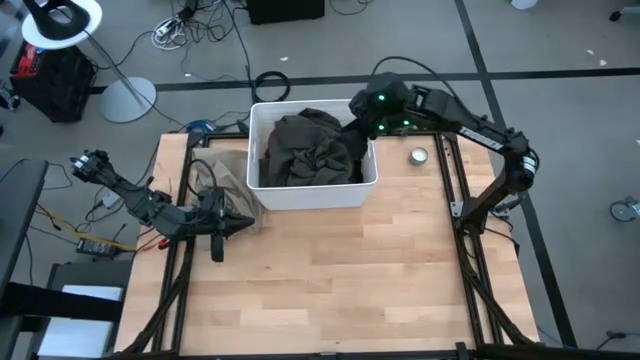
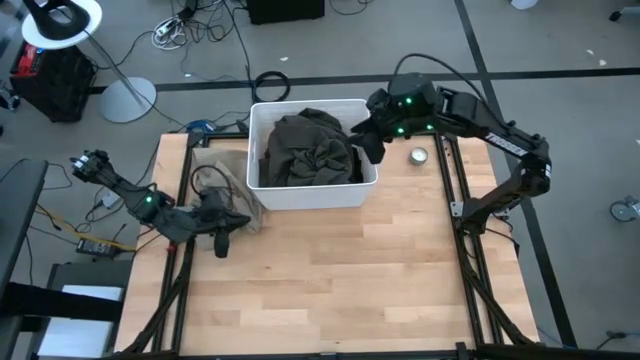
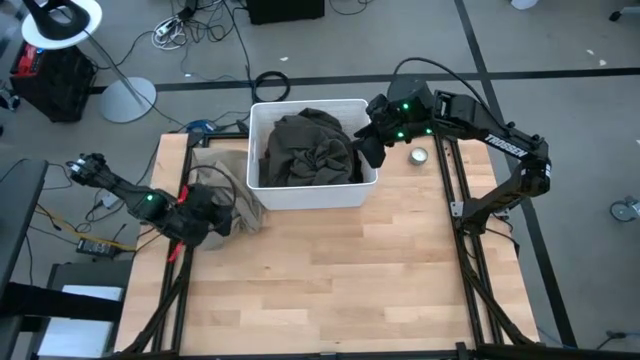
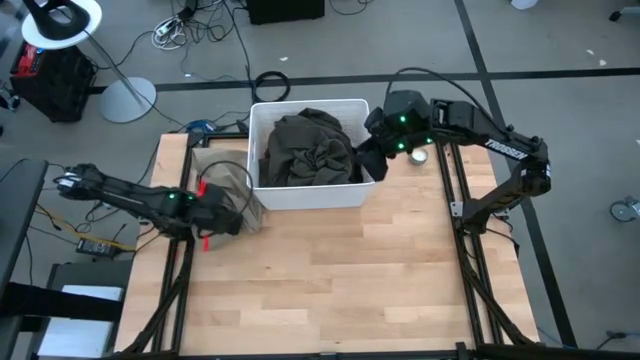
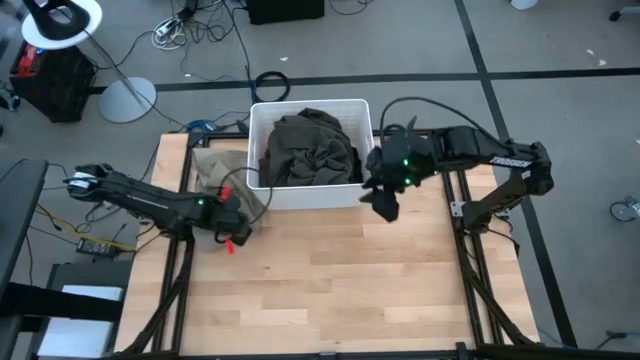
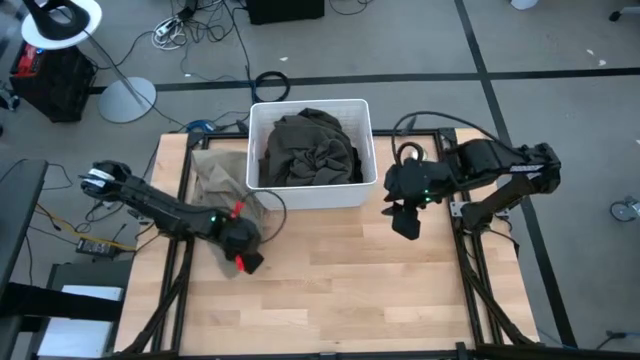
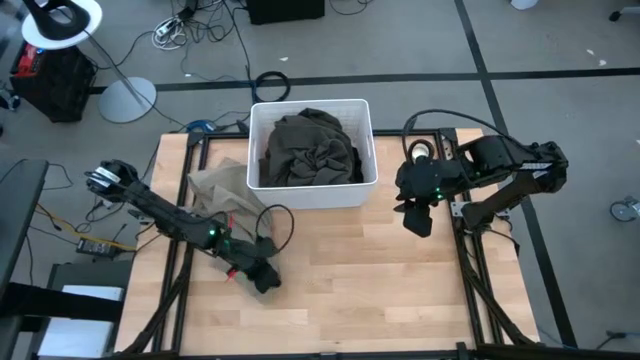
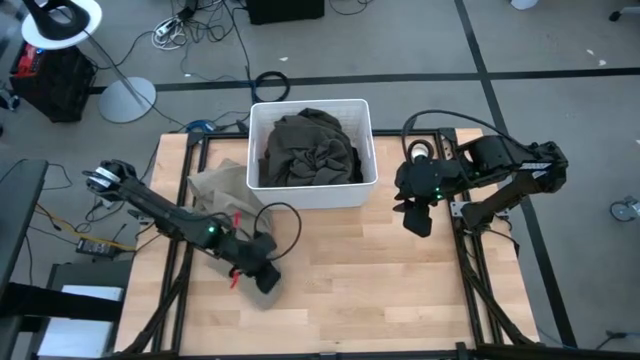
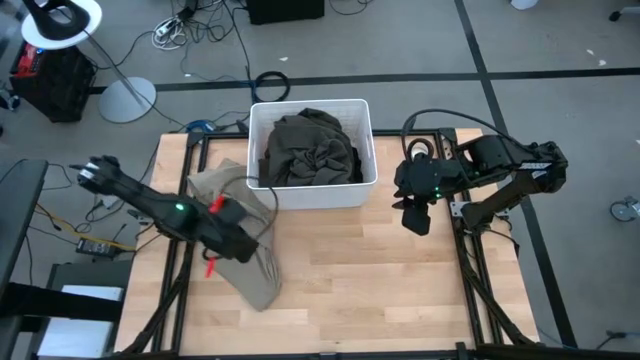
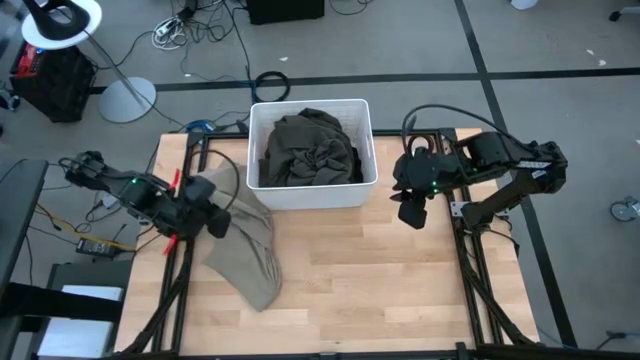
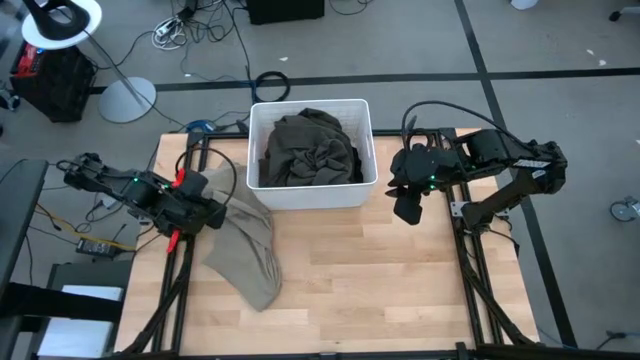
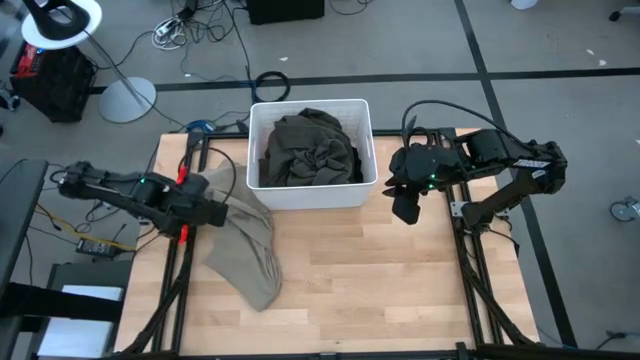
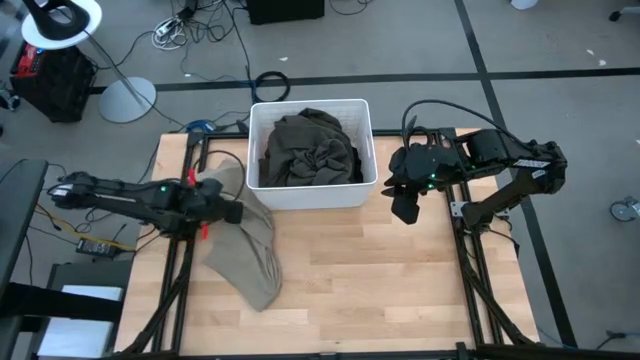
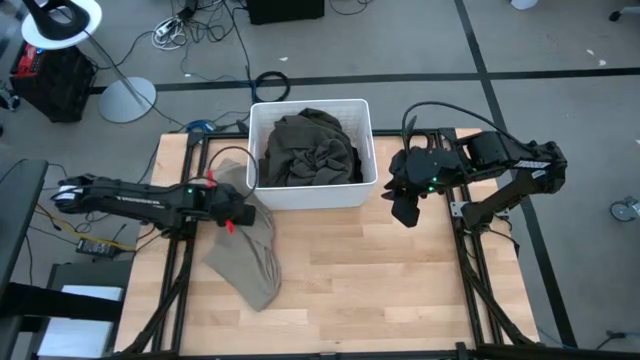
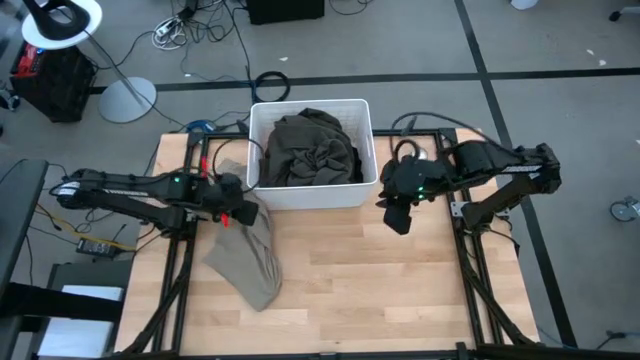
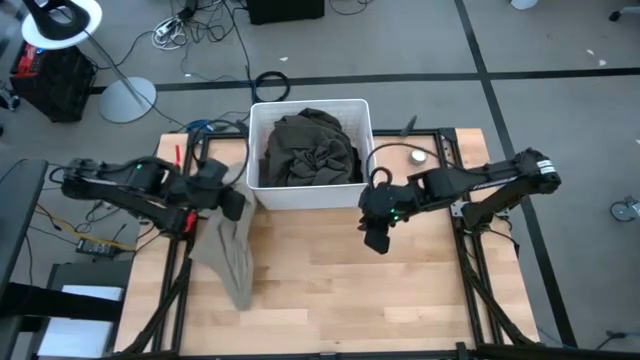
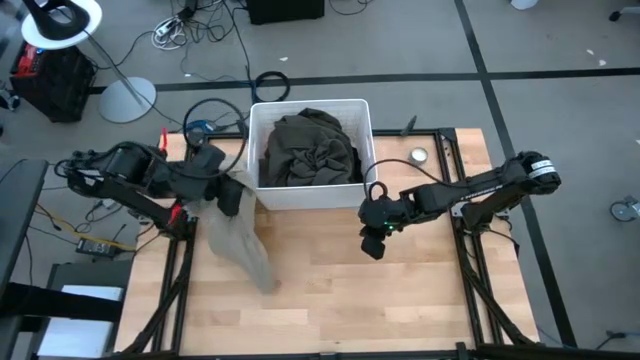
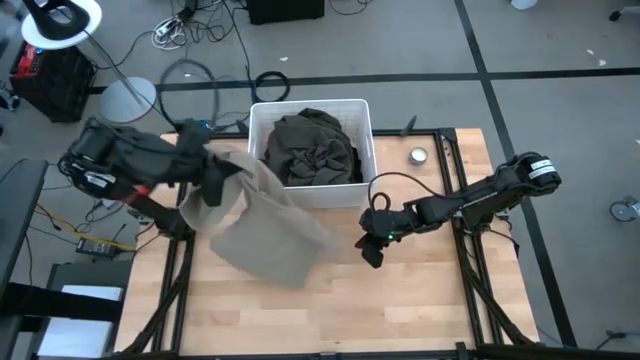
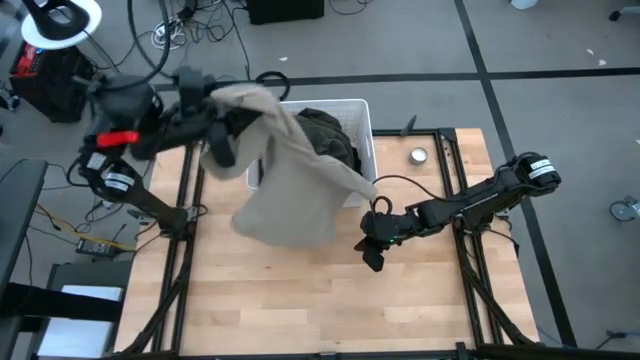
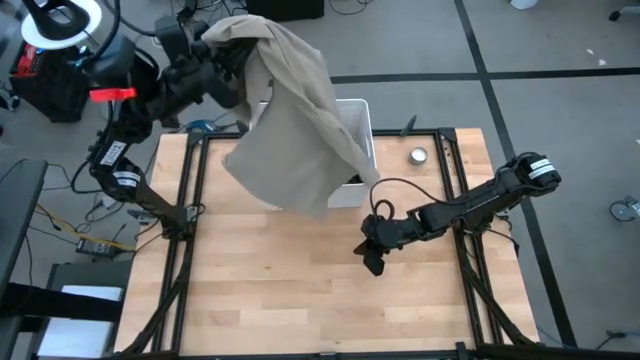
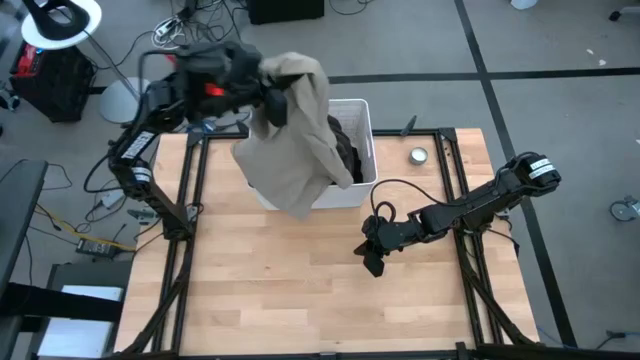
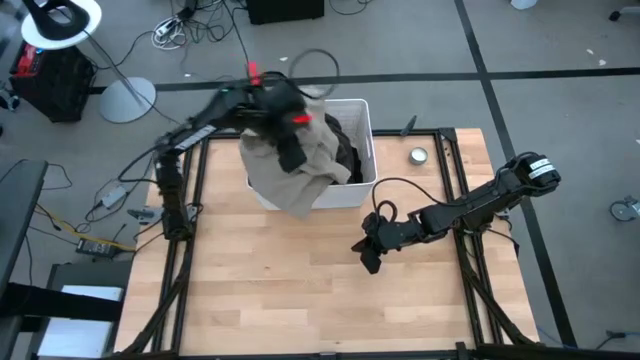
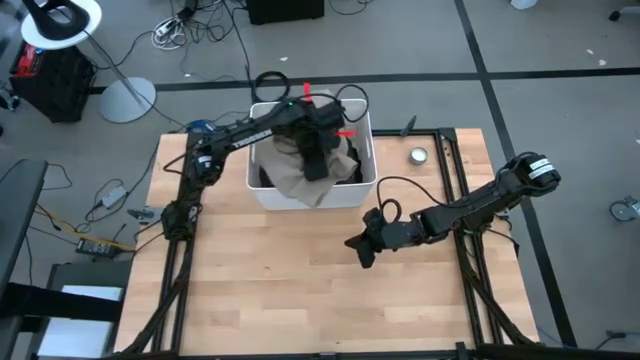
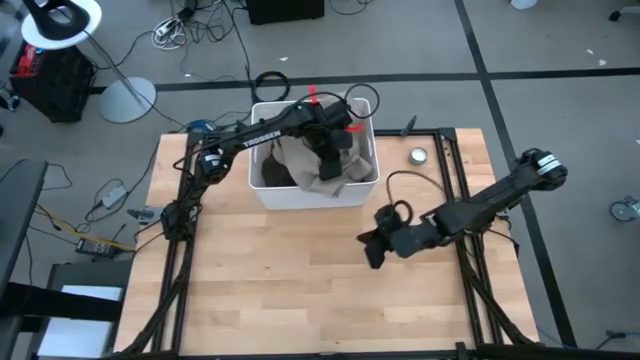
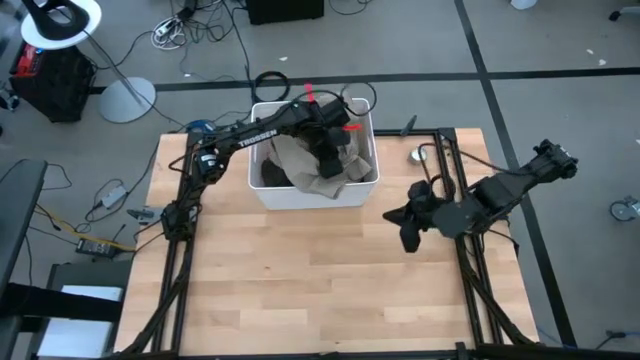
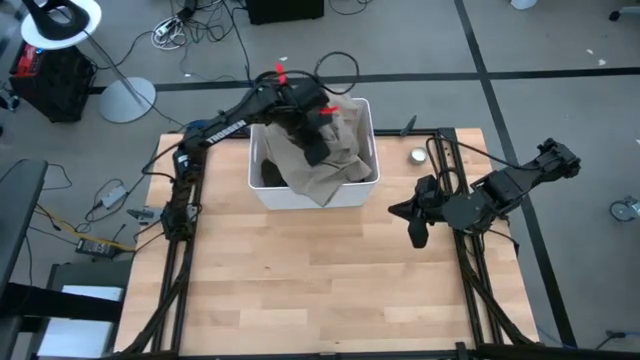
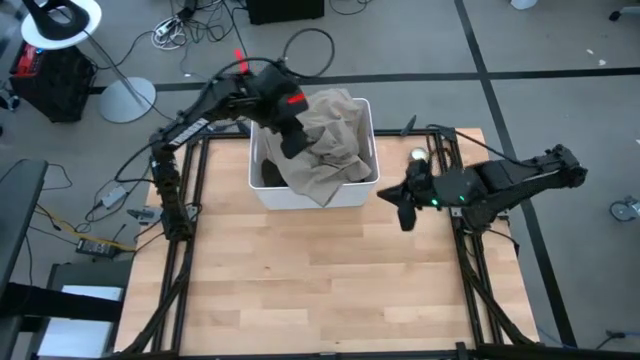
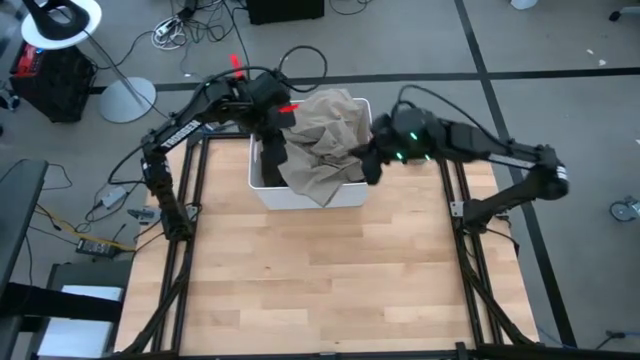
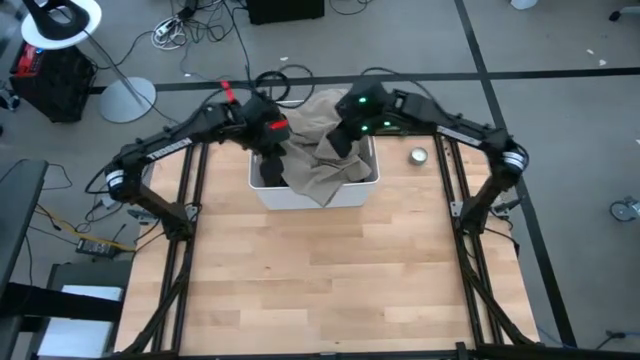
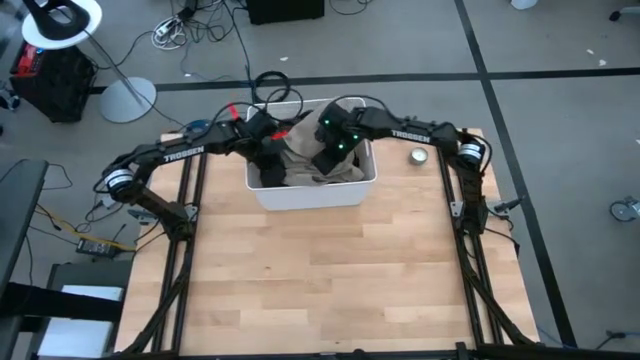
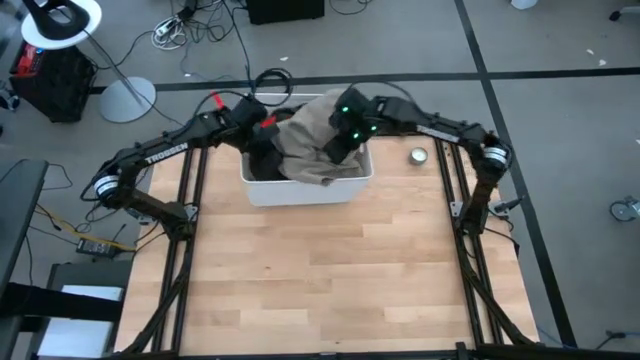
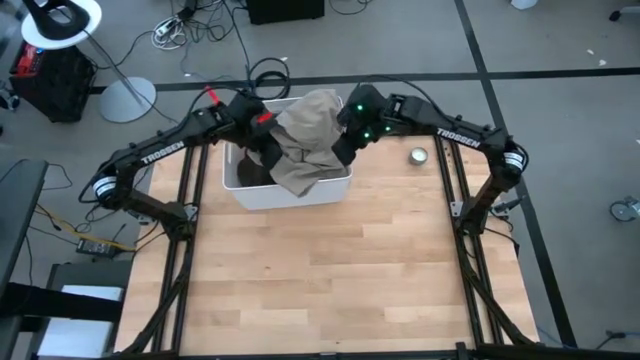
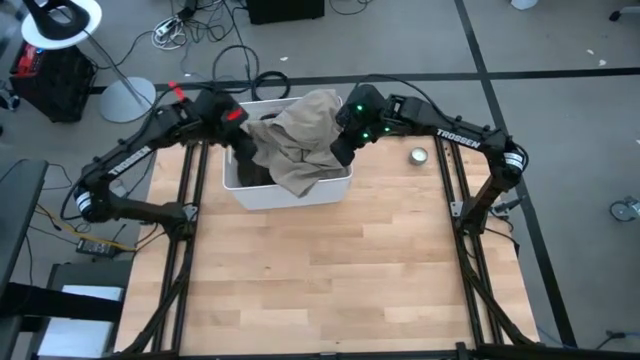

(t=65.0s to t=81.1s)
Task: Sort clothes
Put the gray shorts into the white laundry bin

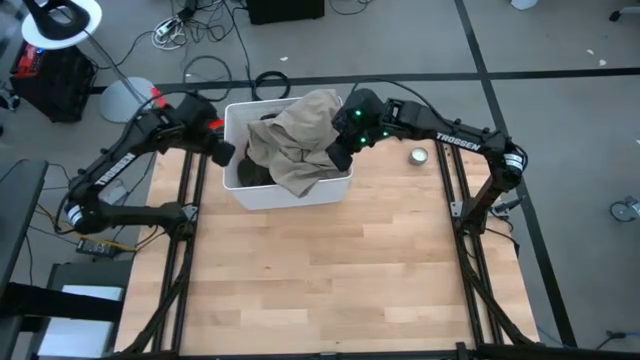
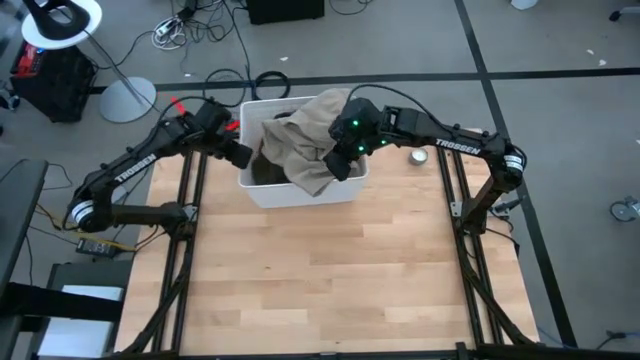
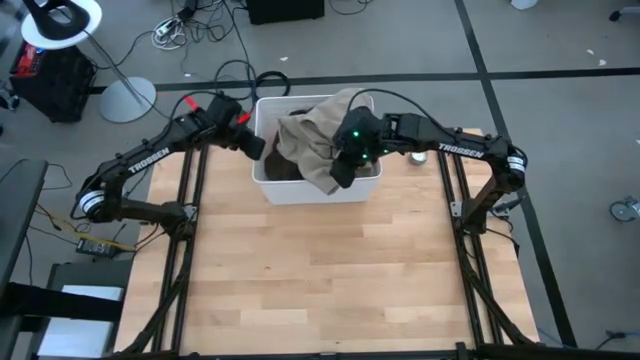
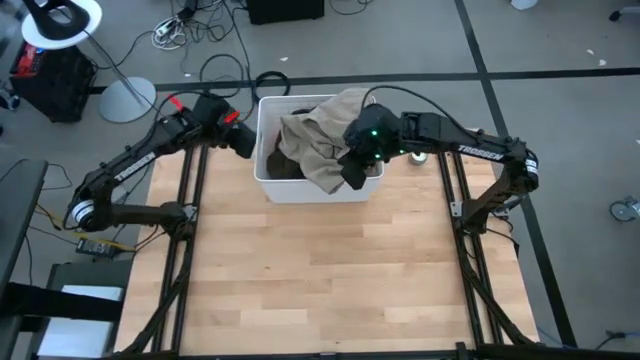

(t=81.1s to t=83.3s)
Adjust the white laundry bin

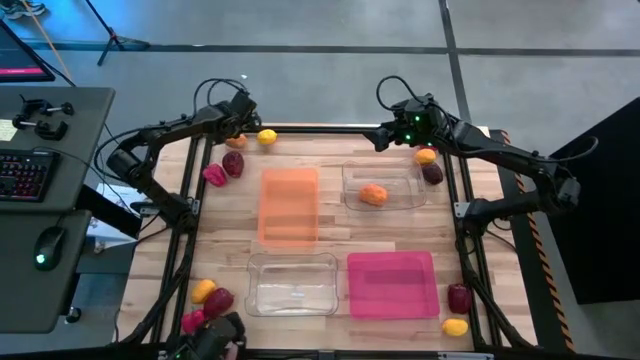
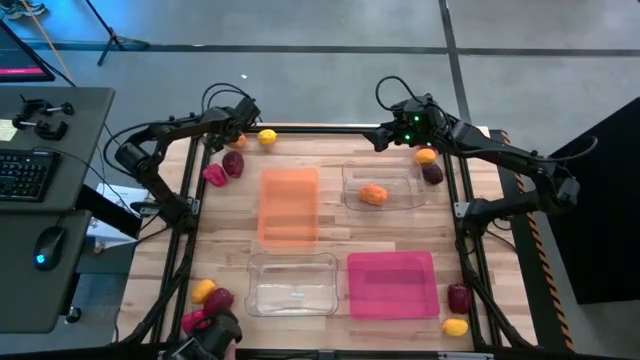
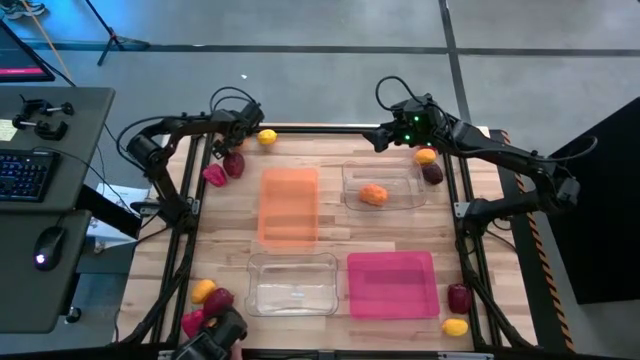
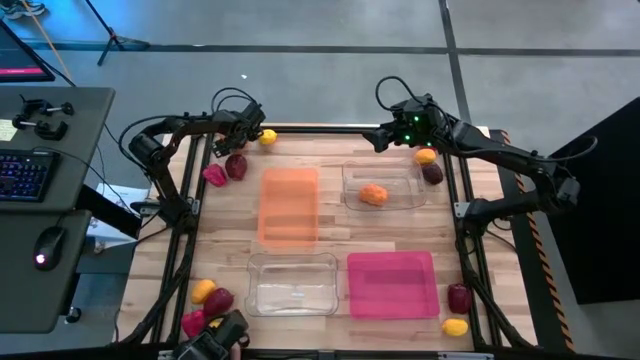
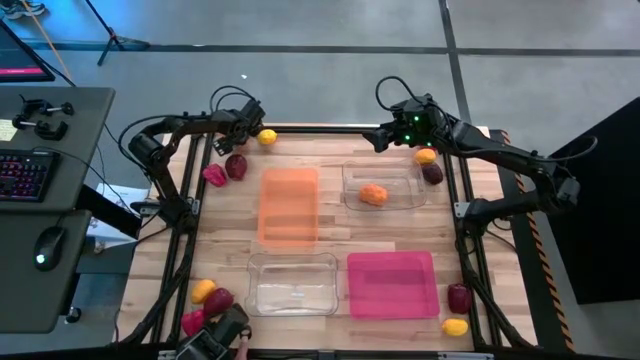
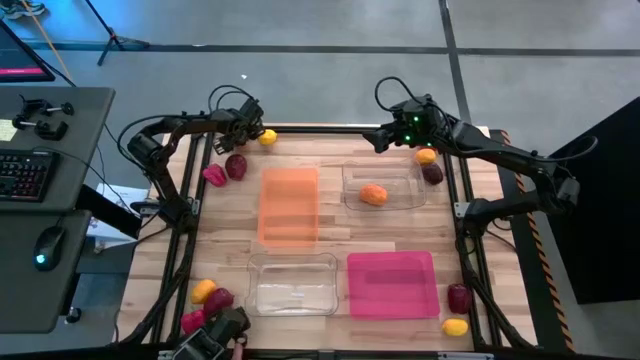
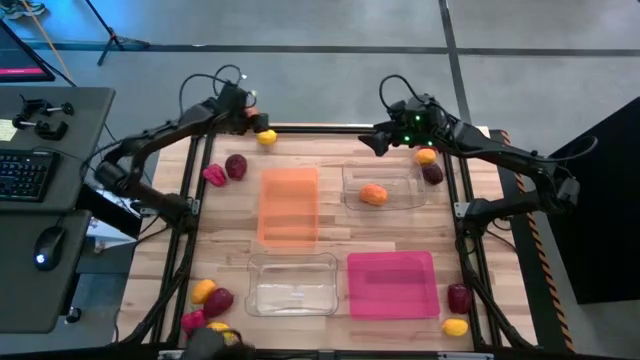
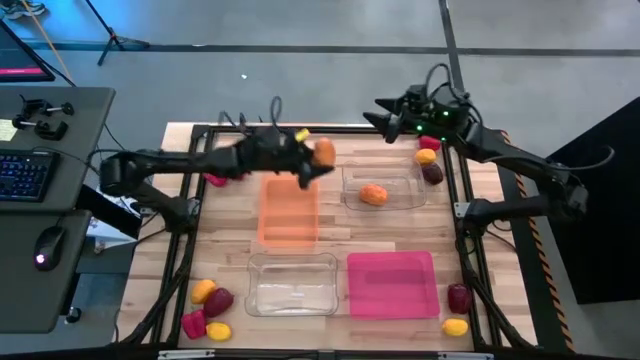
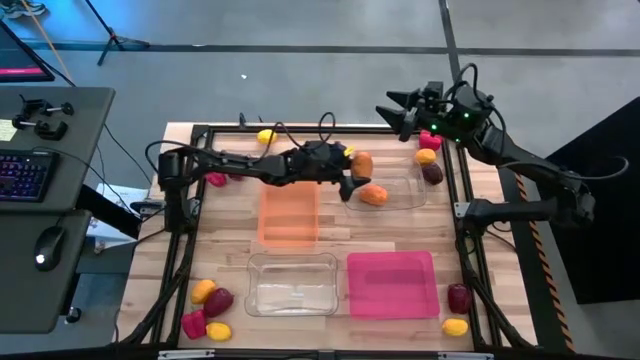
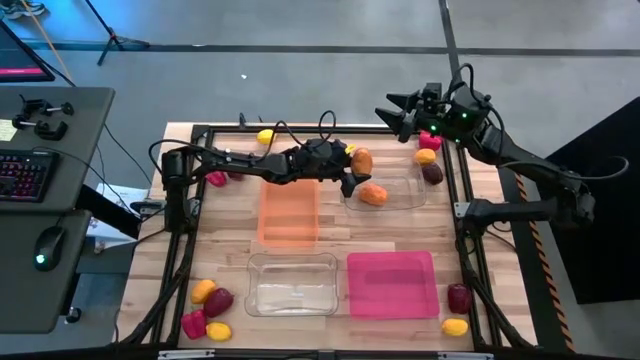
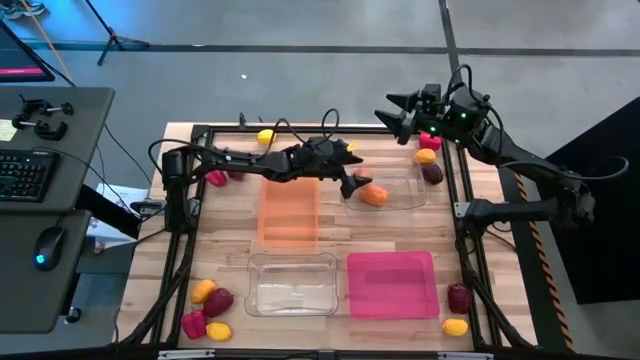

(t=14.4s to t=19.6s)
Task: Sort produce into baskets
Put the mango into the top transparent bin
